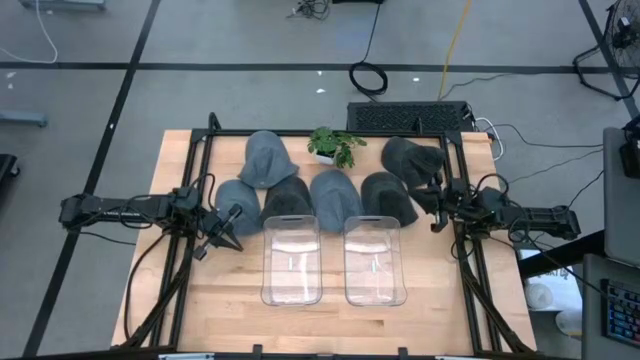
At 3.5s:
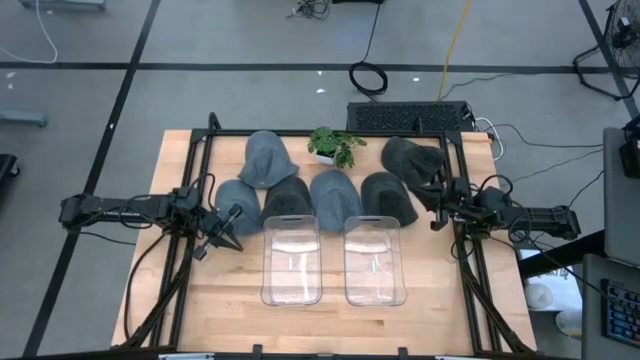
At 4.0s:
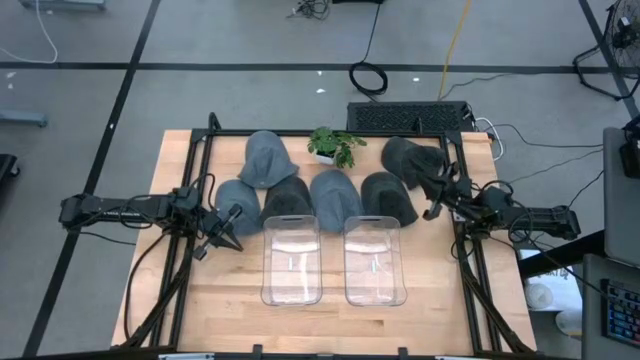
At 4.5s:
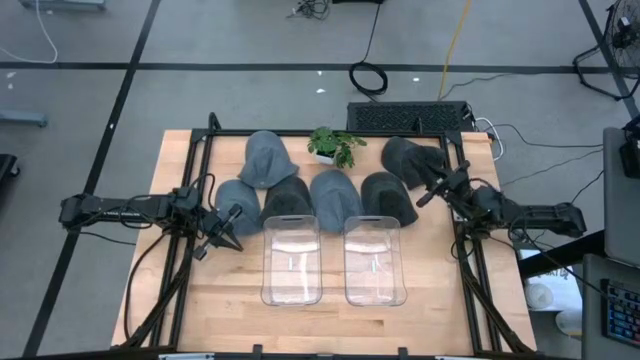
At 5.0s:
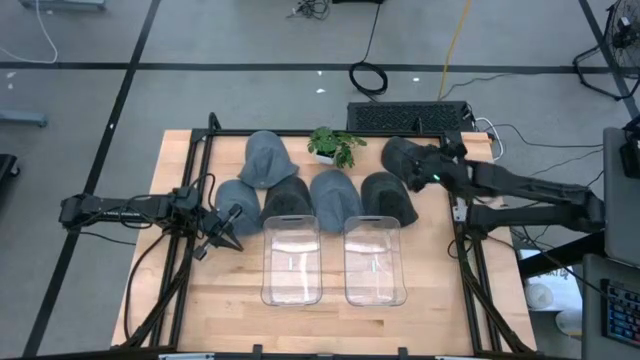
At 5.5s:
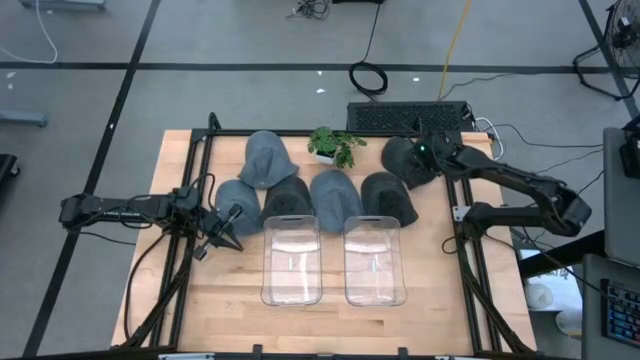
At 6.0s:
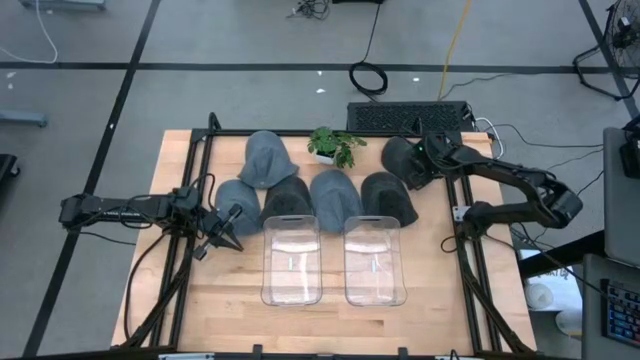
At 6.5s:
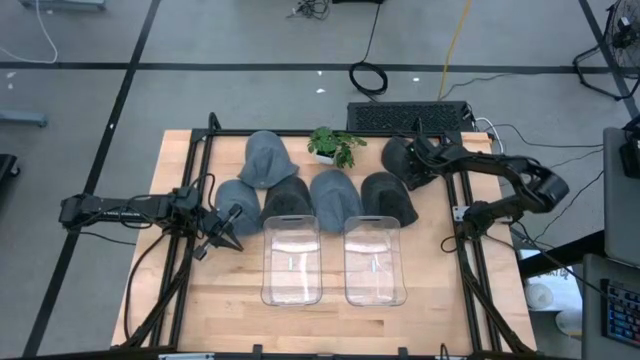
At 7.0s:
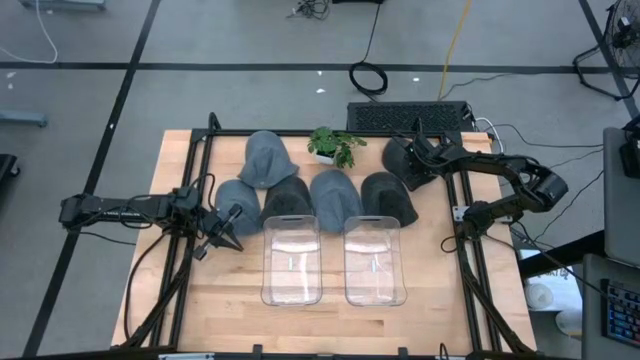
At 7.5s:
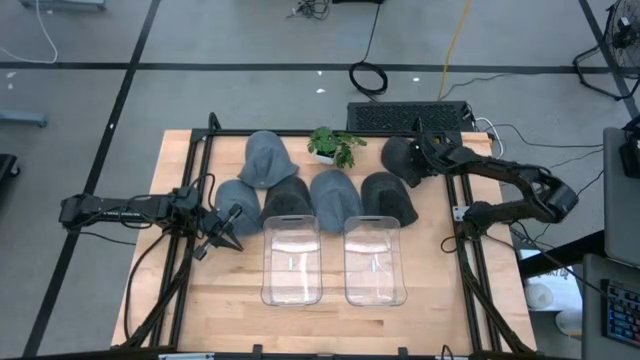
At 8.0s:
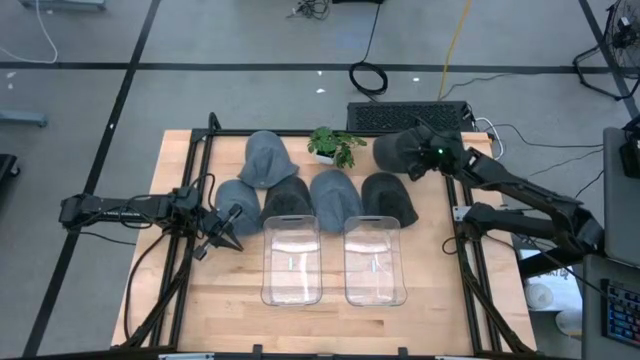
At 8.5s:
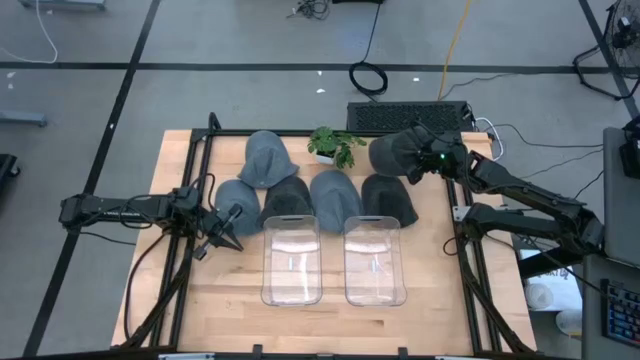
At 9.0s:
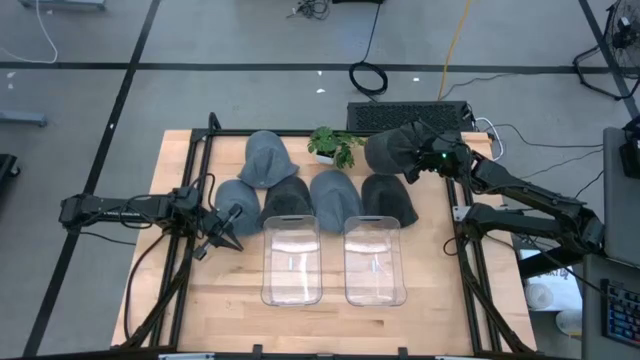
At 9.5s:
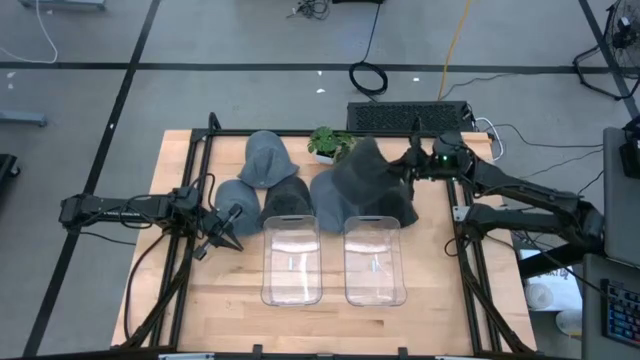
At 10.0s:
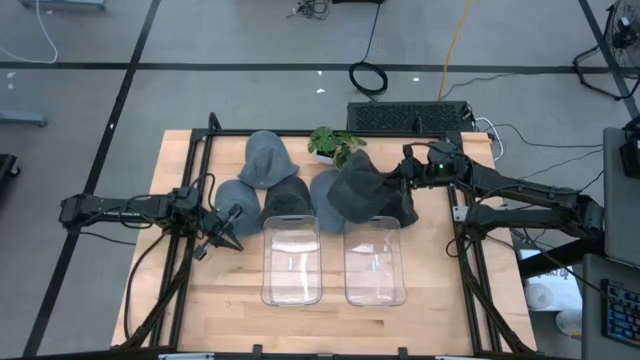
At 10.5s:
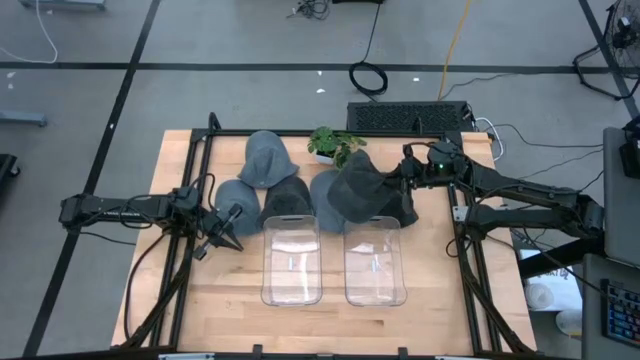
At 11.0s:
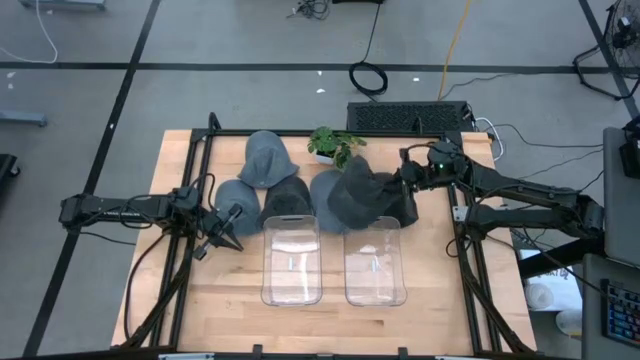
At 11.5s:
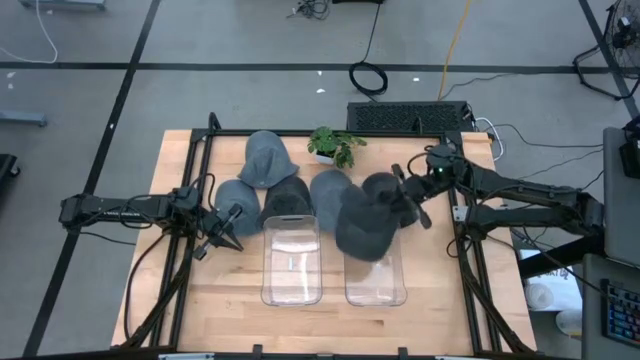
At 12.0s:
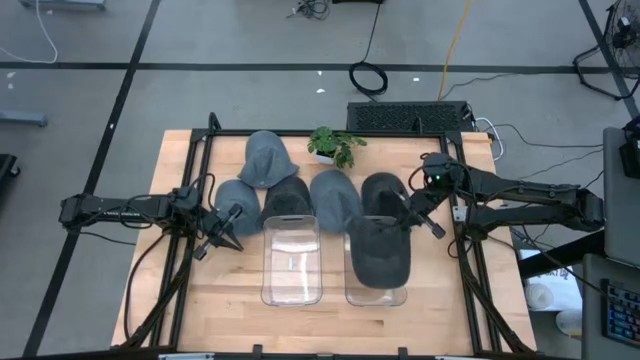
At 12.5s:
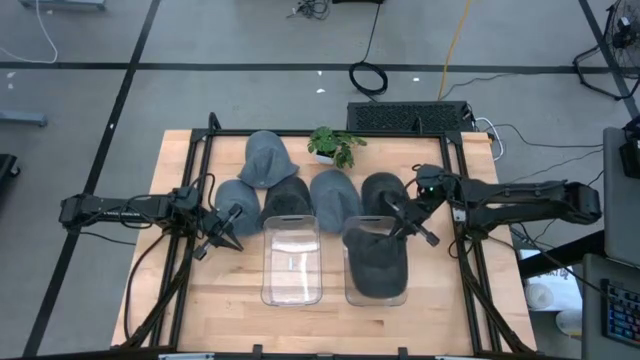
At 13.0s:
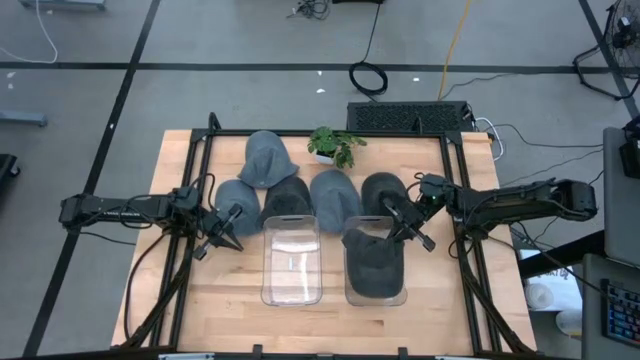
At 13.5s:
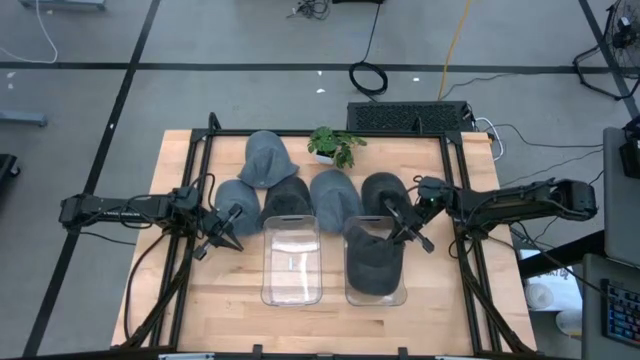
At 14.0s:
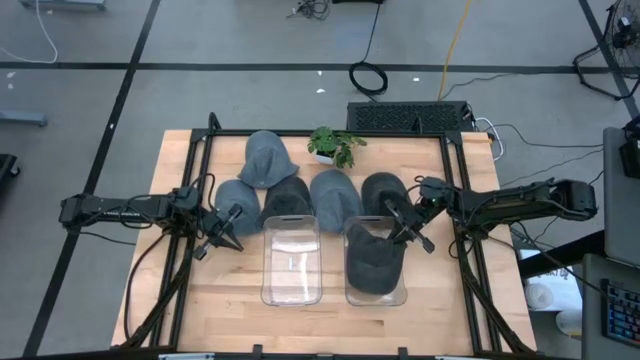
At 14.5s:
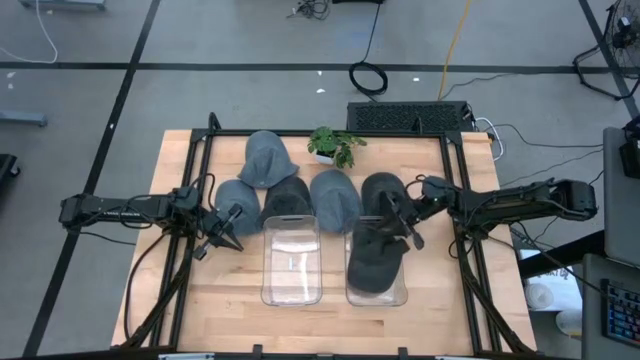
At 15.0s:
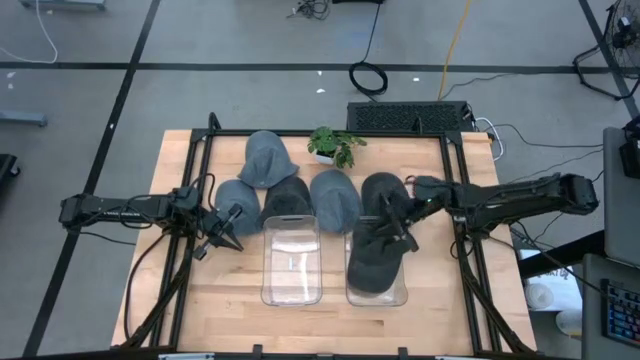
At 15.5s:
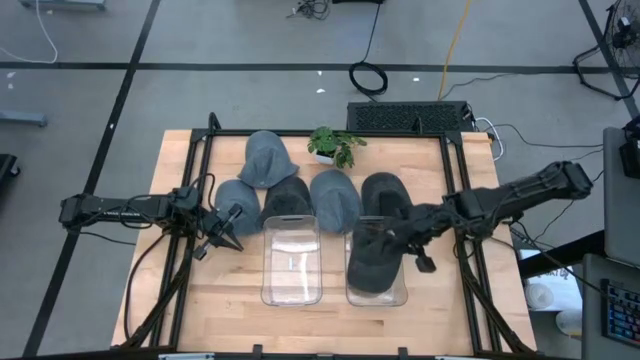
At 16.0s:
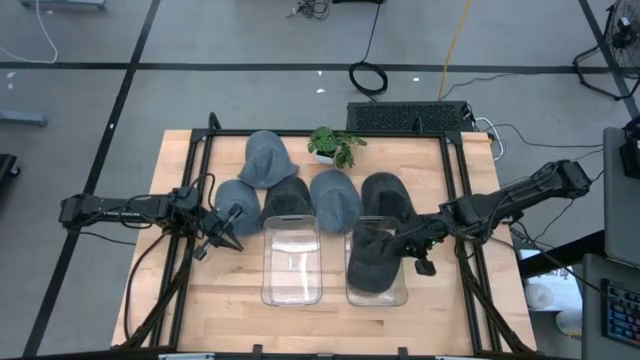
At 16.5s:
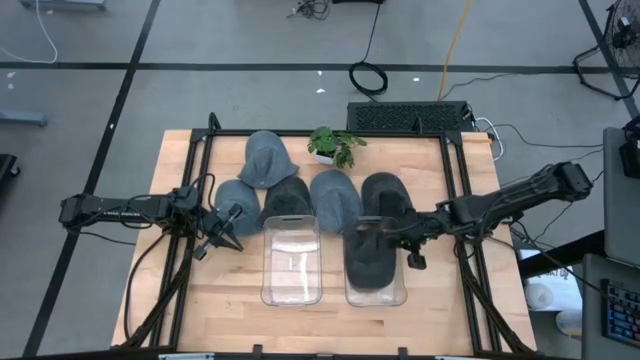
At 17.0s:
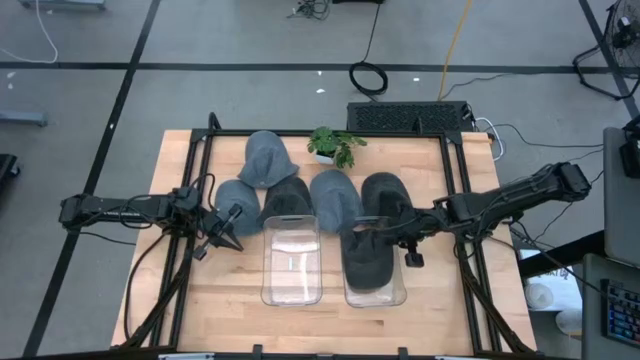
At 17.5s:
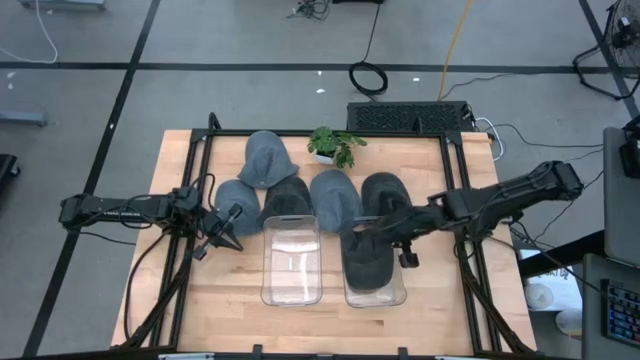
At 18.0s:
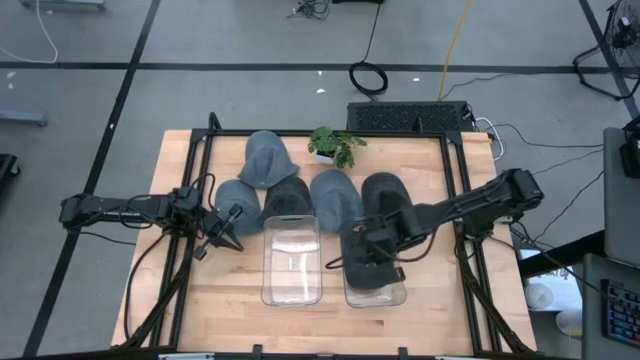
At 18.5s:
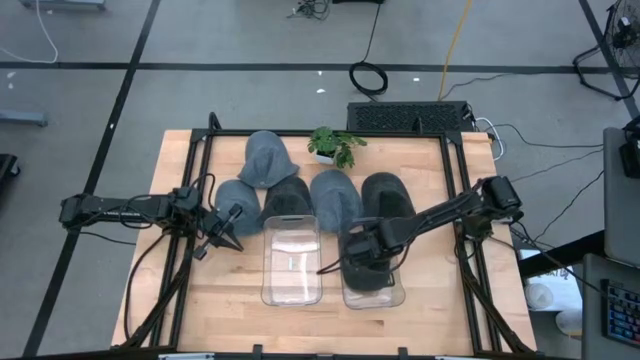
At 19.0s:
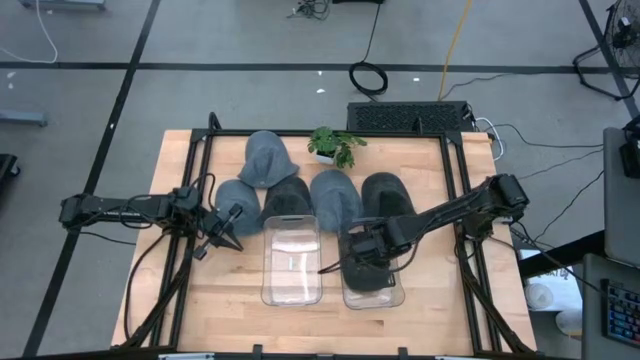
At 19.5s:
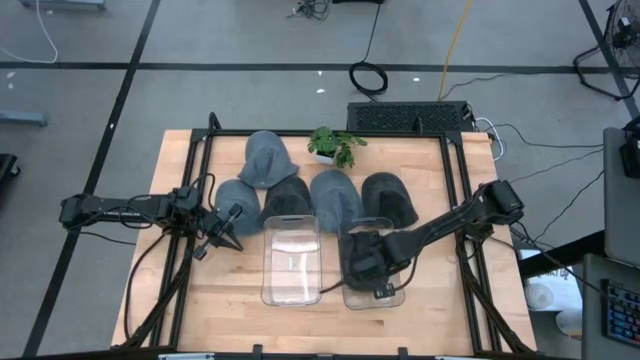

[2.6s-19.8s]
Task: Pick & Place hat
Put the top black cap into the right transparent bin

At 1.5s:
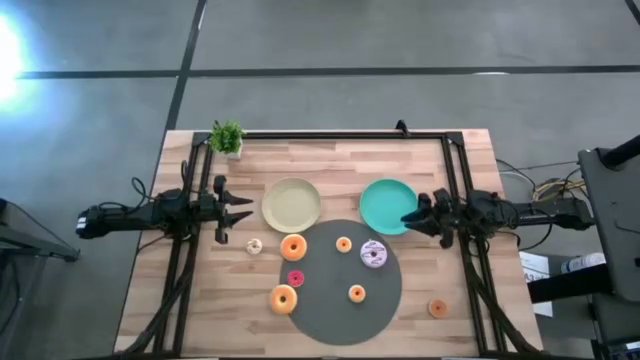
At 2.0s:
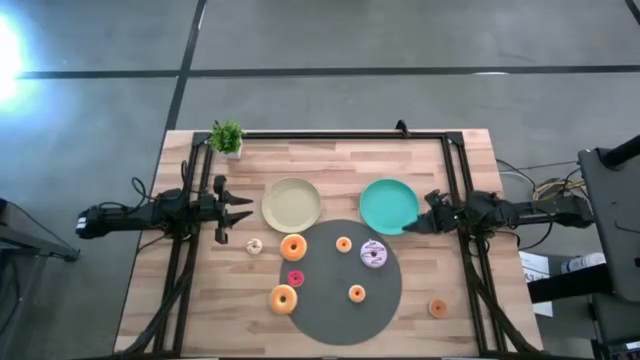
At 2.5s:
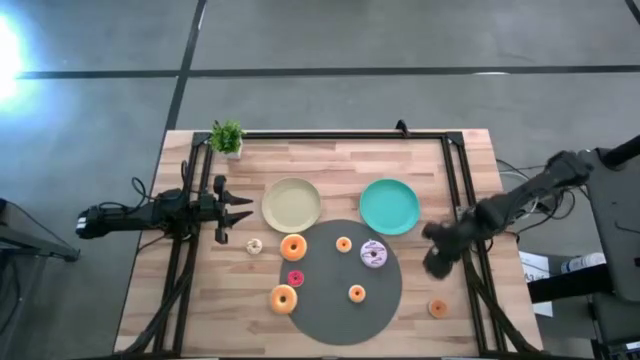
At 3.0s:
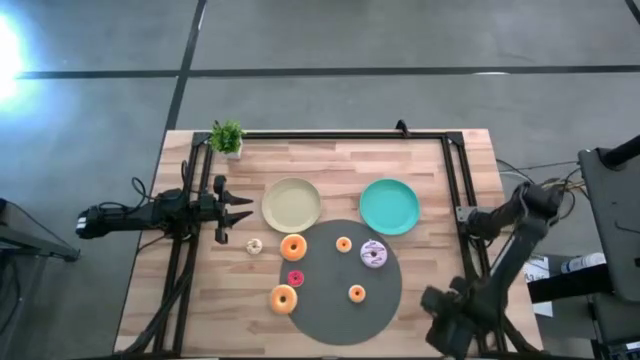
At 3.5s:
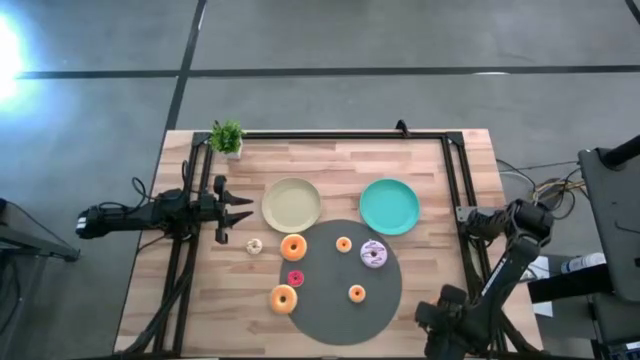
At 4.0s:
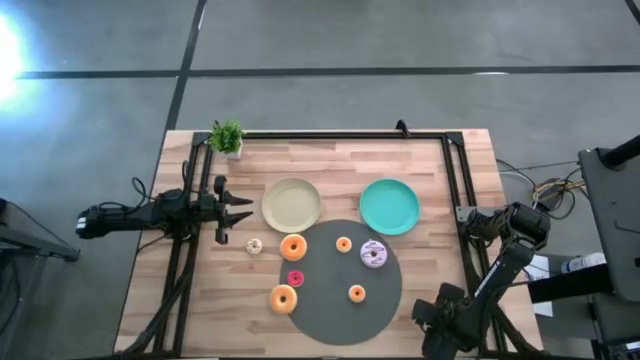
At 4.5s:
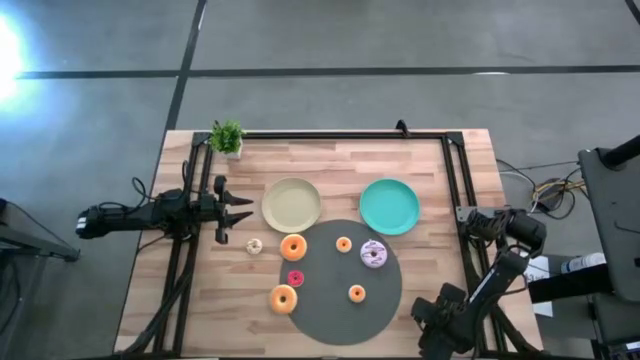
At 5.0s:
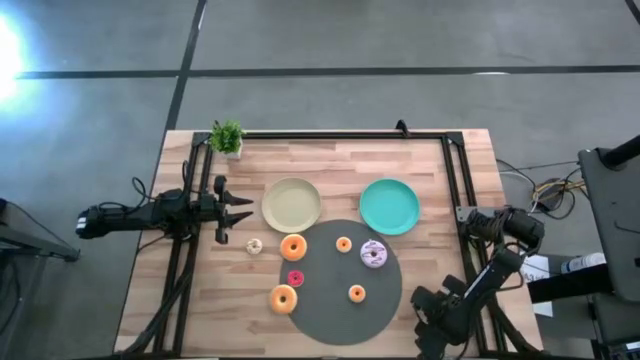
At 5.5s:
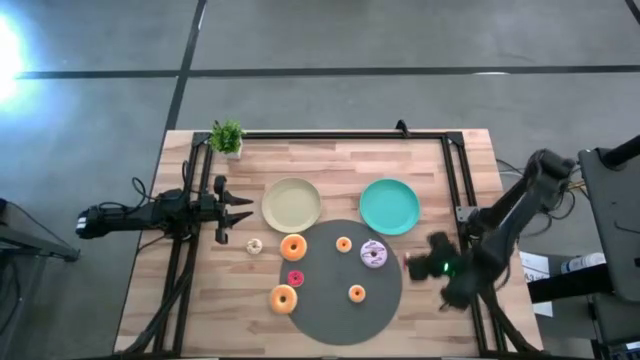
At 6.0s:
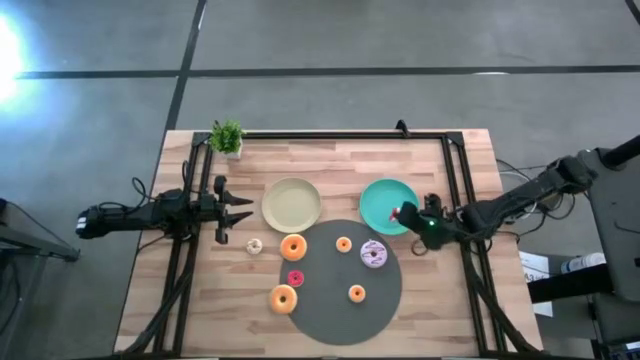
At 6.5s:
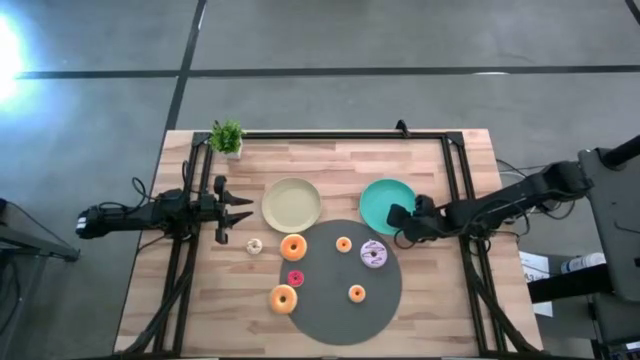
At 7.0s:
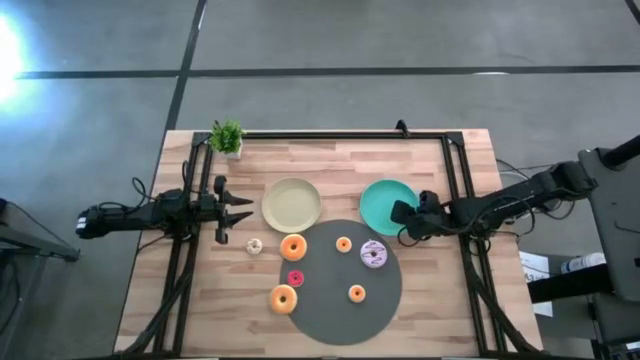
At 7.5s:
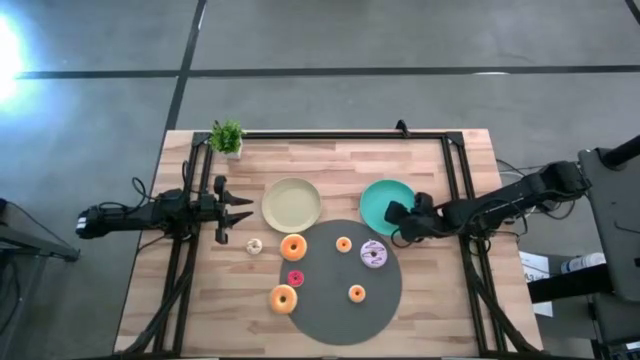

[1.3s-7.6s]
Task: Pick & Place donuts
Put the small orange donut on the green plate
